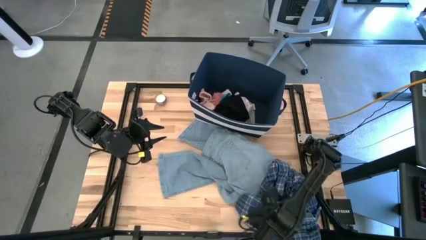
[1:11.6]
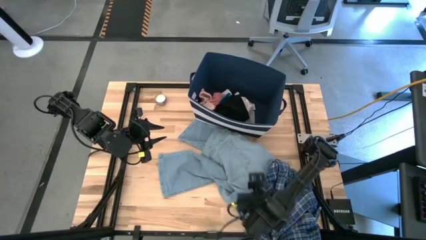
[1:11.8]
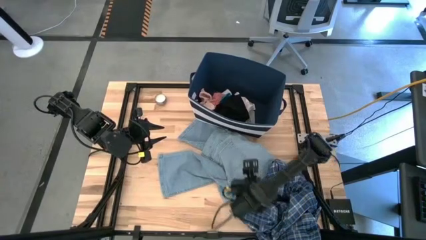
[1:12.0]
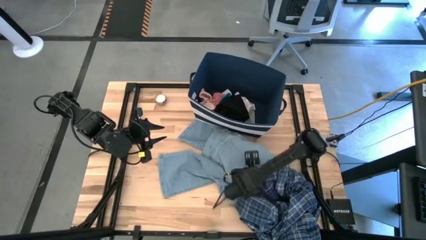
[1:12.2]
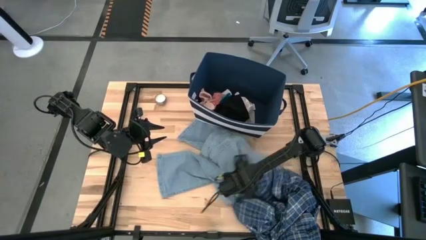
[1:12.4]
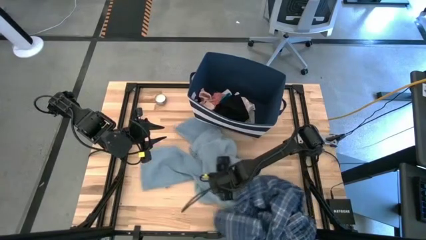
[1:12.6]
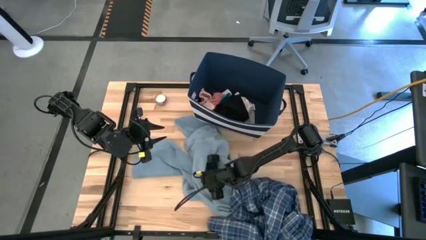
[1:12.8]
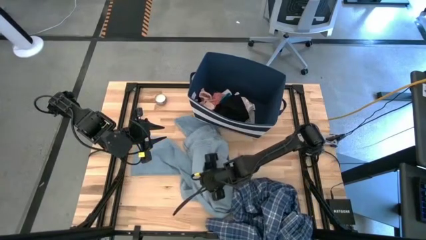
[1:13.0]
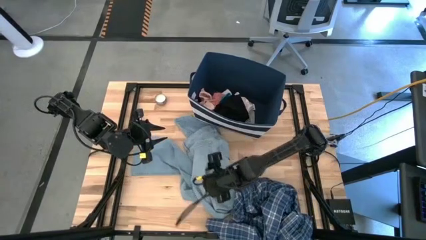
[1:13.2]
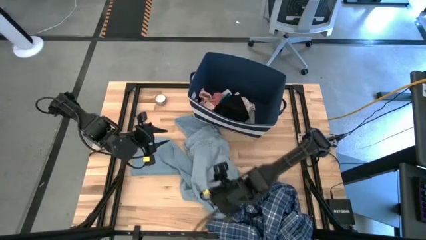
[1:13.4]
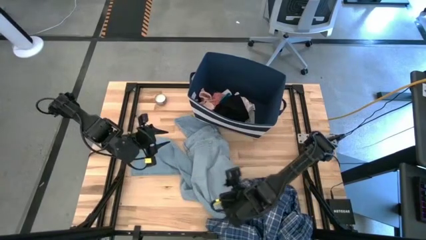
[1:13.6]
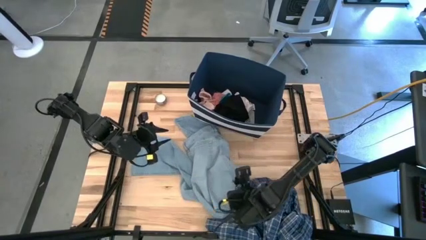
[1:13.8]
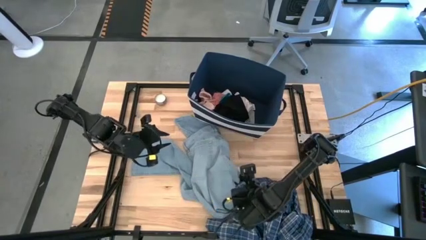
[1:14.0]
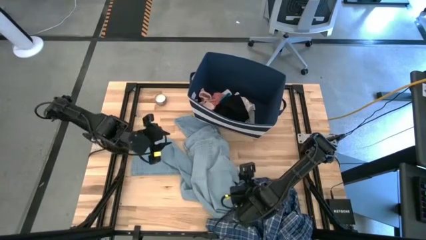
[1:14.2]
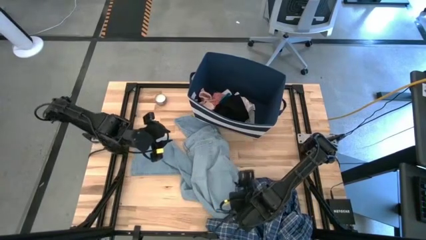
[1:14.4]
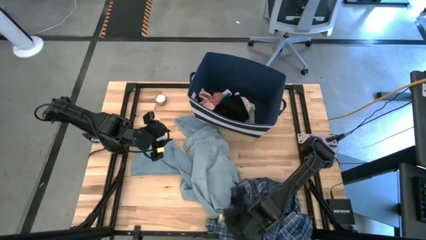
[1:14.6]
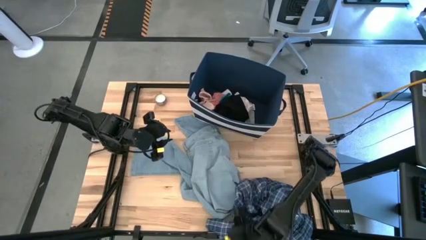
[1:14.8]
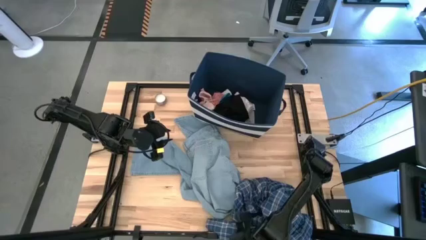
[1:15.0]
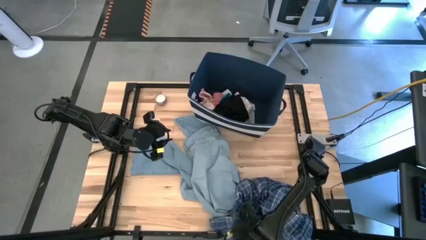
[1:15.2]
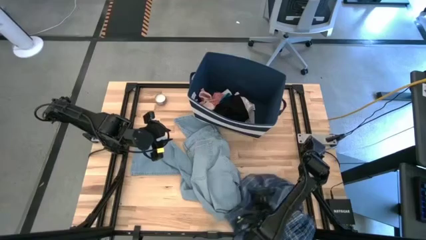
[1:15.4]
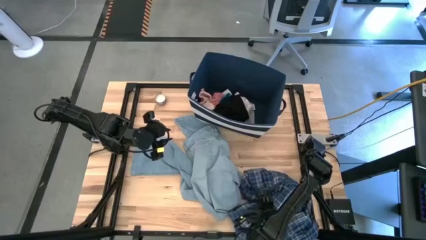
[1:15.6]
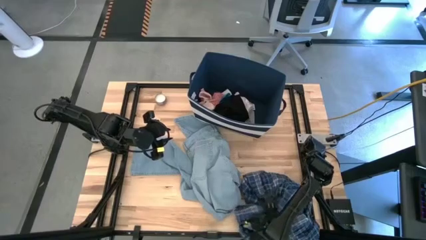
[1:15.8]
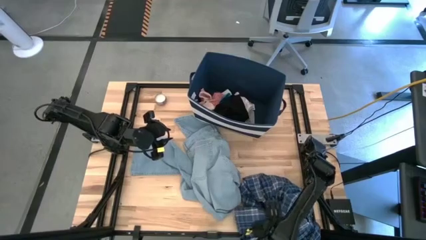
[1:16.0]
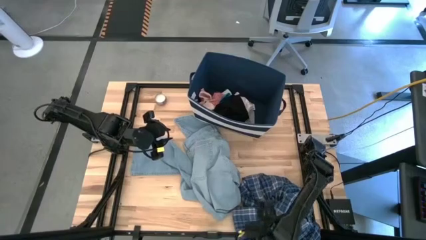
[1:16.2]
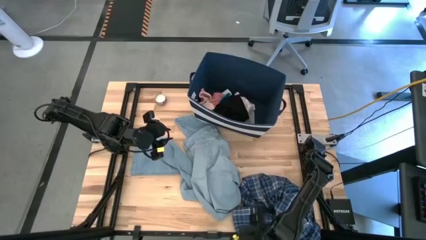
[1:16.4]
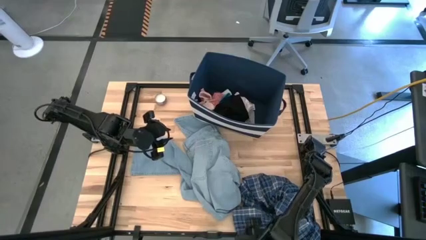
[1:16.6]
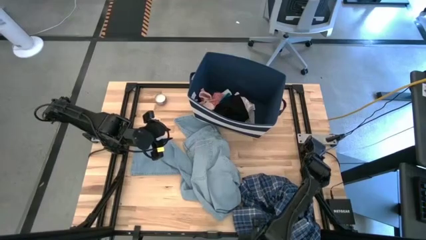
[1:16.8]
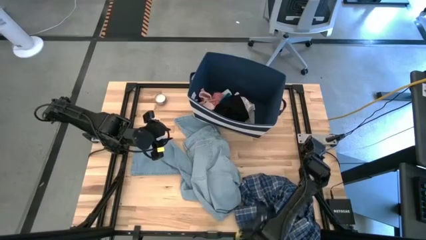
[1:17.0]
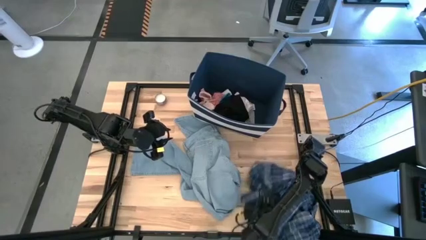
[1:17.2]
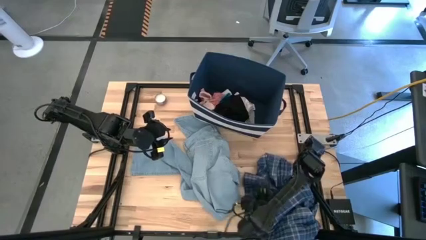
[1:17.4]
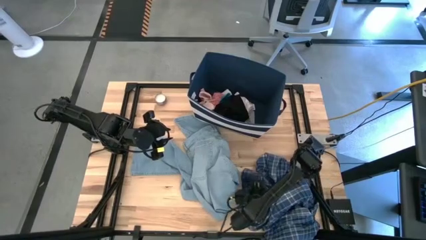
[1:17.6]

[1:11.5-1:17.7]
Task: Sort clothes
Adjust the pants

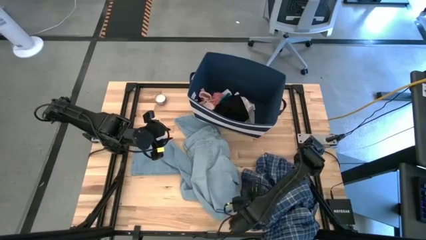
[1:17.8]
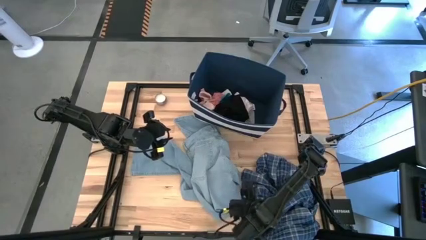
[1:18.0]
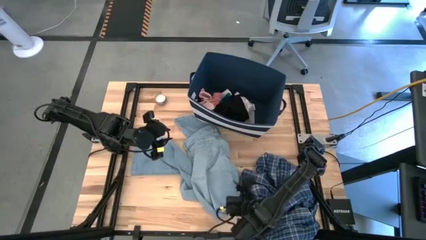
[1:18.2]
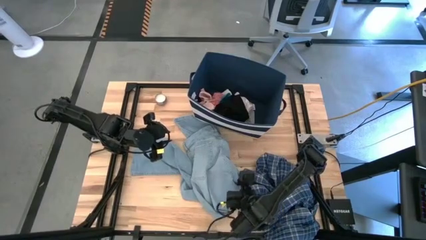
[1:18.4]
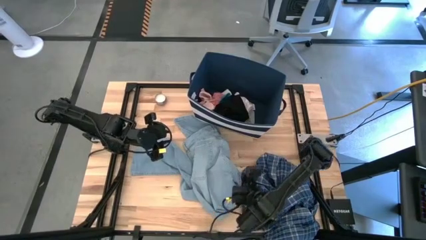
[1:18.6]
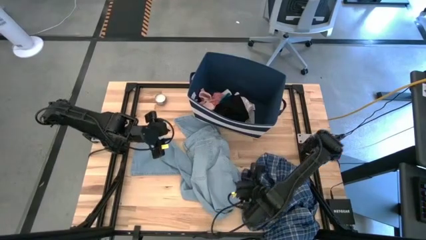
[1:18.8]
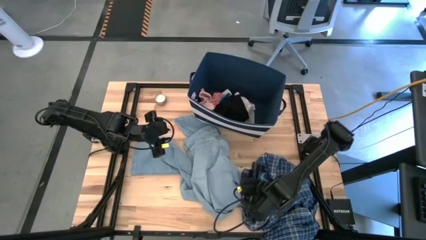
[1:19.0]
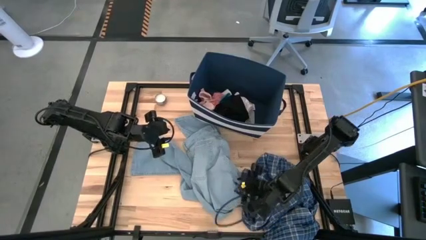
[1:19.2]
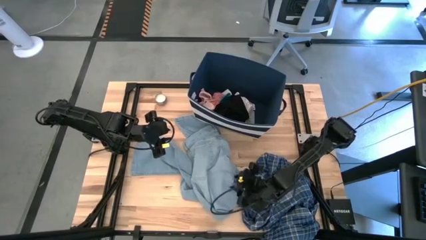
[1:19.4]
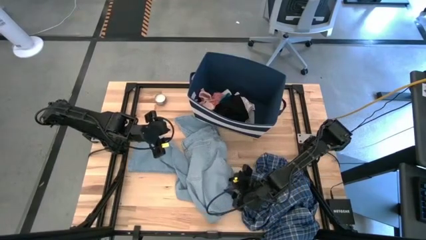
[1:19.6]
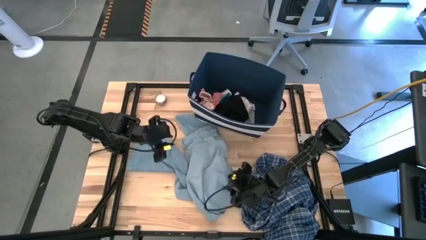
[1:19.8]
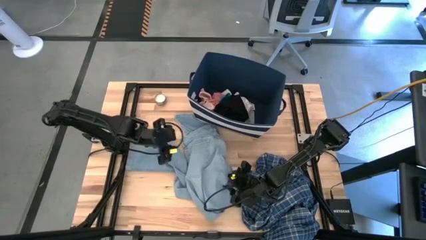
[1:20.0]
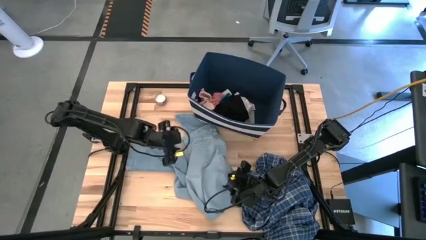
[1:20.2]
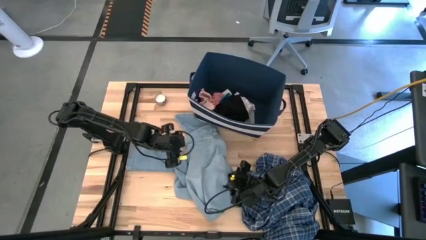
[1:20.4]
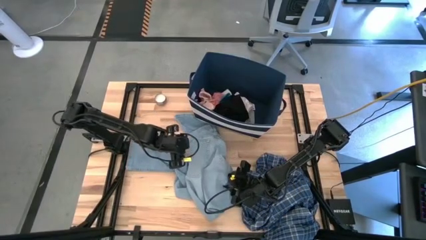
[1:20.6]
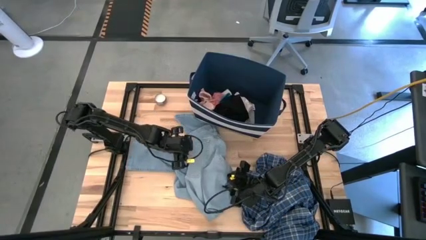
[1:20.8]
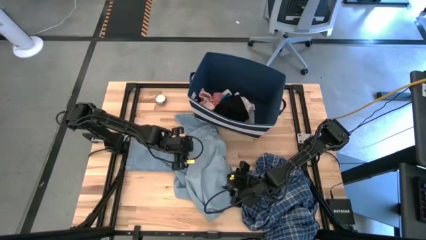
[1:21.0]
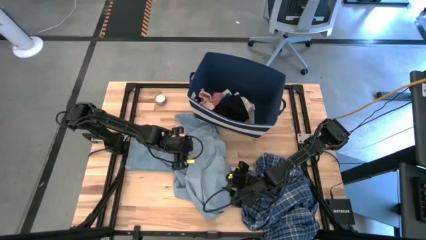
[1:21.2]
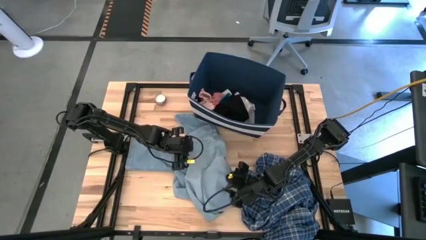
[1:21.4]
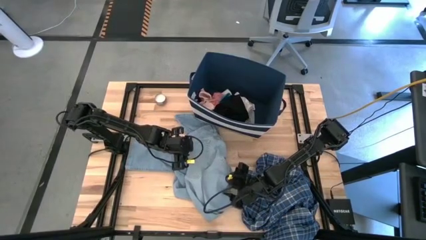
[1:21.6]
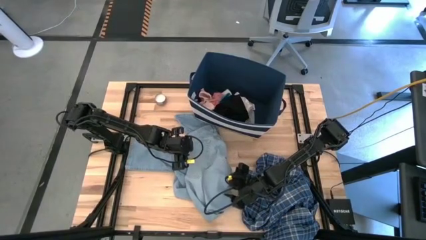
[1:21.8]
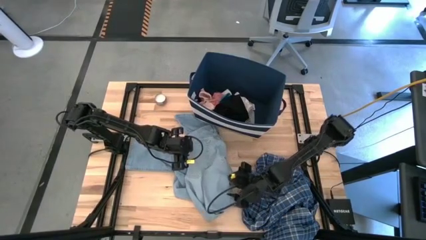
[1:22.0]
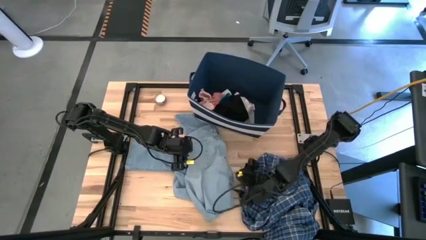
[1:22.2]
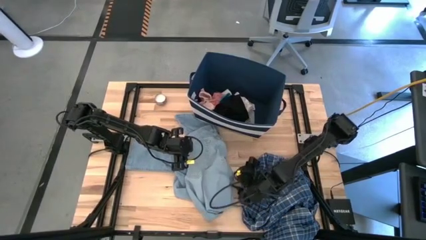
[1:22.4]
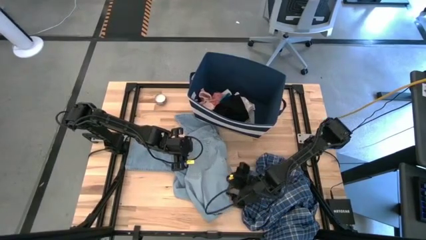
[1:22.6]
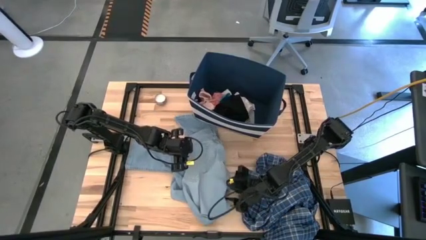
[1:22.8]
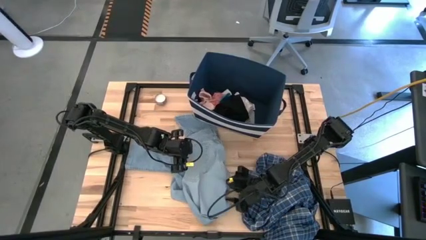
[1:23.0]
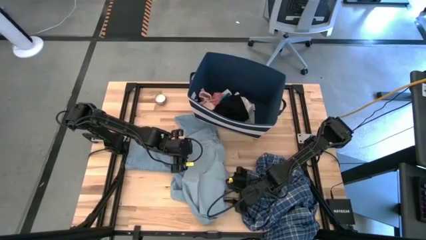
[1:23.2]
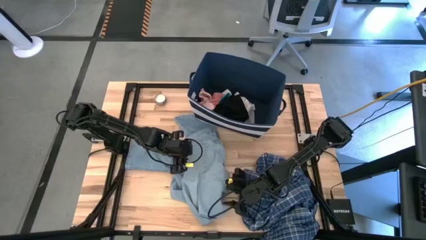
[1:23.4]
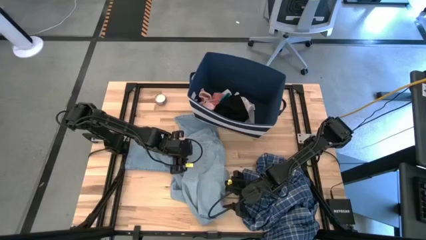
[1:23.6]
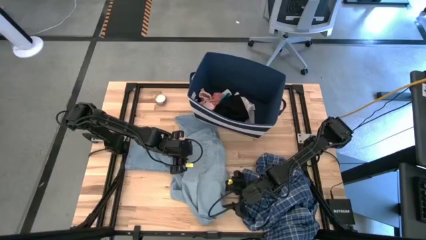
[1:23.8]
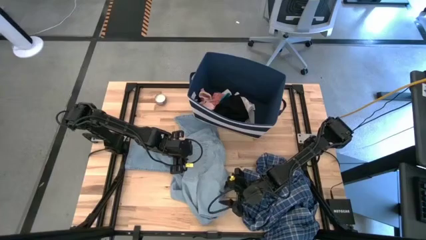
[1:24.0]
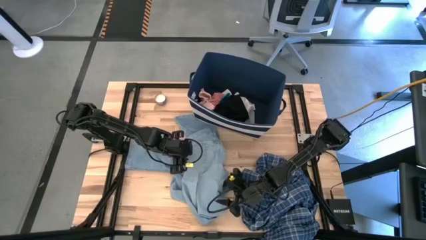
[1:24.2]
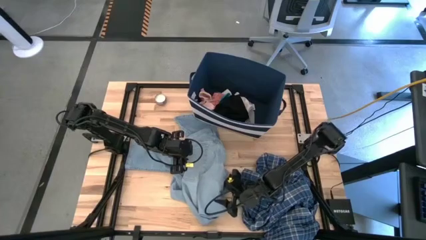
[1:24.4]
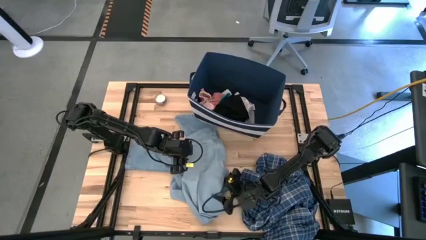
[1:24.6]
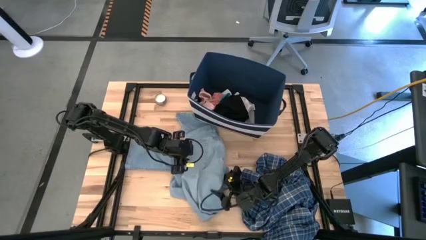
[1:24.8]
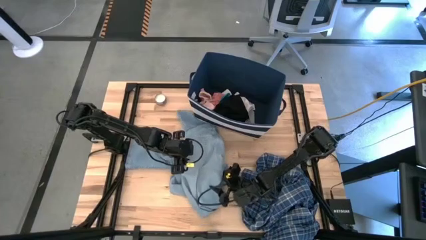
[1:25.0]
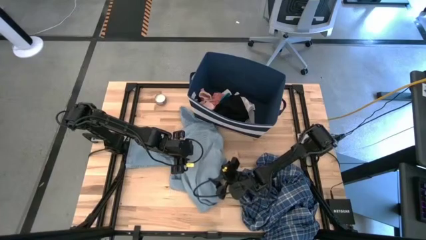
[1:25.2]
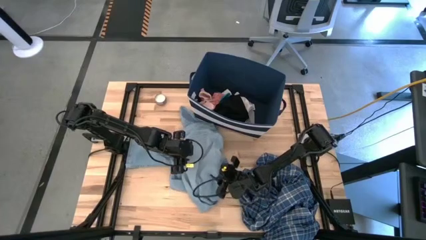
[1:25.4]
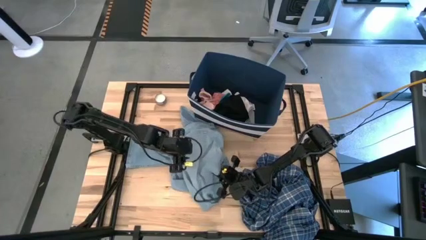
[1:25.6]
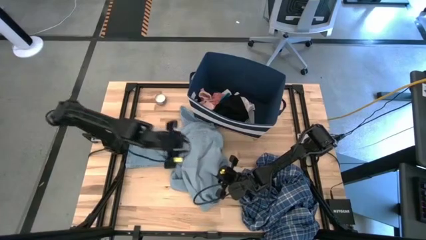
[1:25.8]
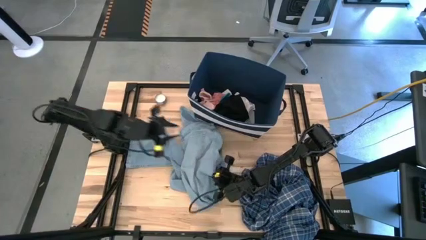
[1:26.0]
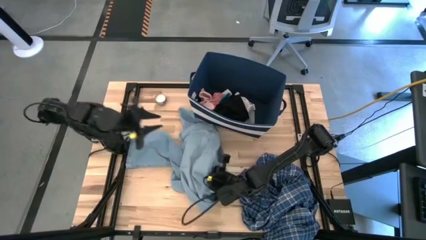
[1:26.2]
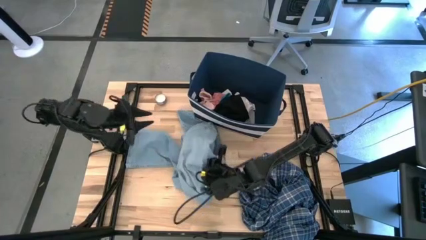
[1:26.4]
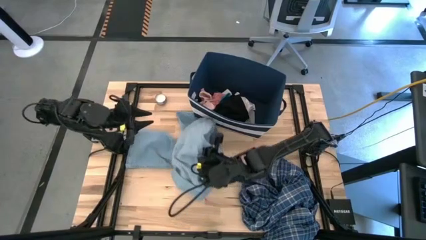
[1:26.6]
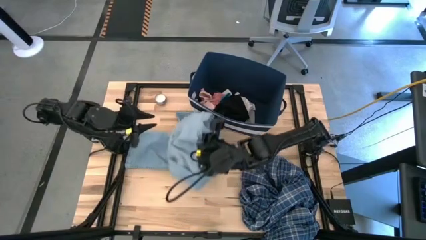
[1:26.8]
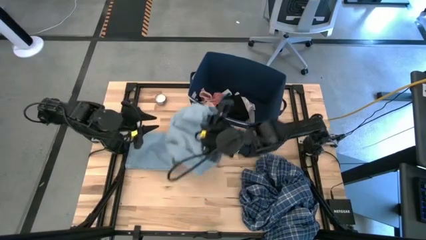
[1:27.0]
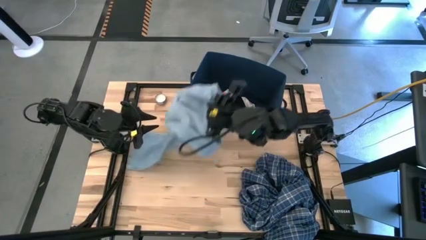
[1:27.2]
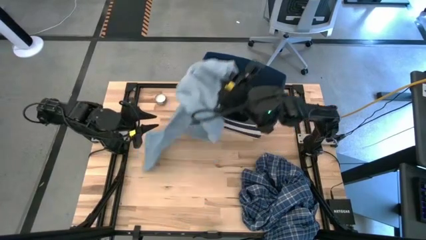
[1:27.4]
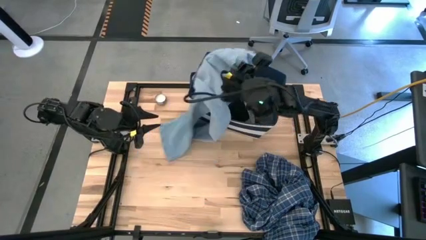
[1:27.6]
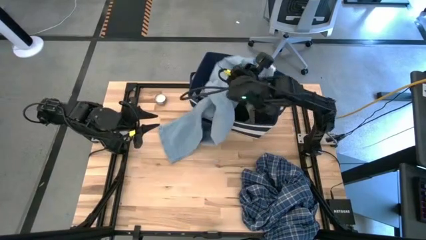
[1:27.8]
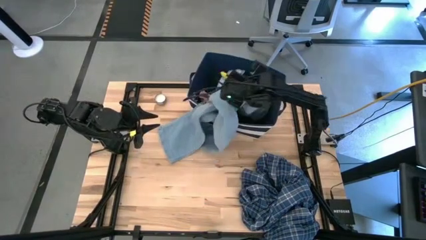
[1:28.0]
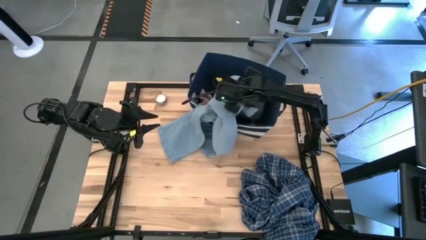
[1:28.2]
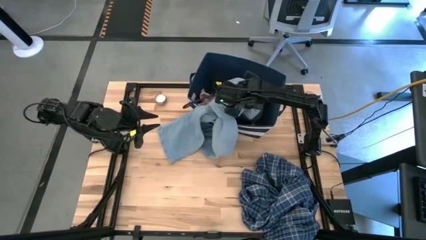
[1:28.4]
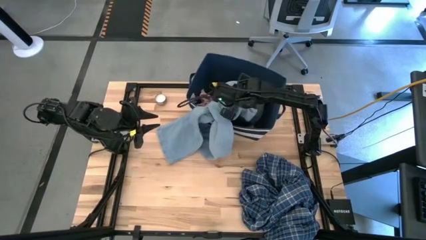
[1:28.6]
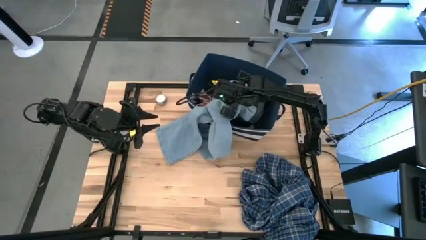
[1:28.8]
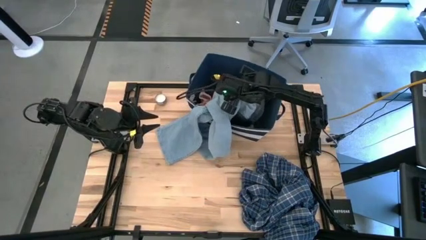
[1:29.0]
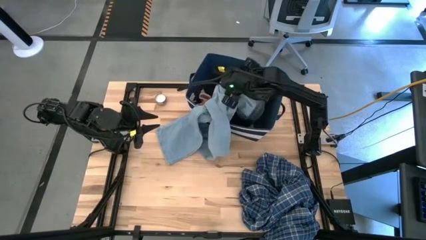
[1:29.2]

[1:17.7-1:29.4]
Put the light blue pants into the blue laundry organizer
